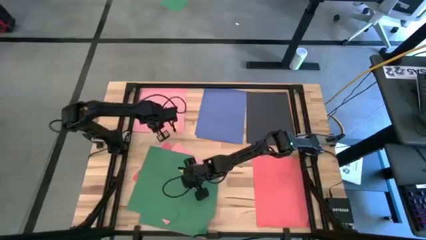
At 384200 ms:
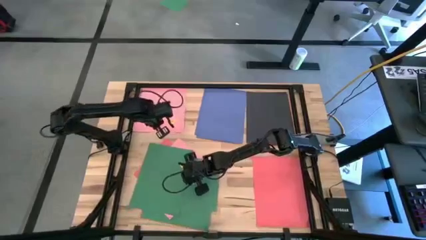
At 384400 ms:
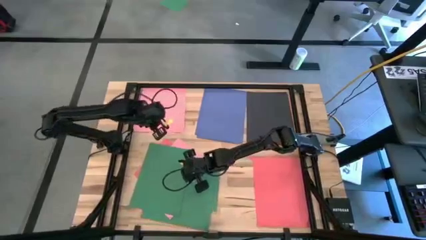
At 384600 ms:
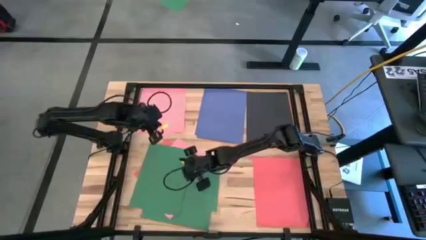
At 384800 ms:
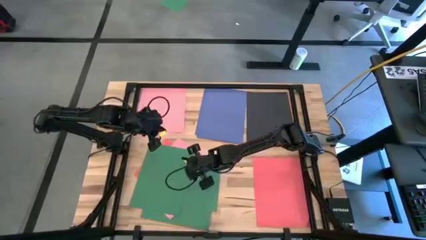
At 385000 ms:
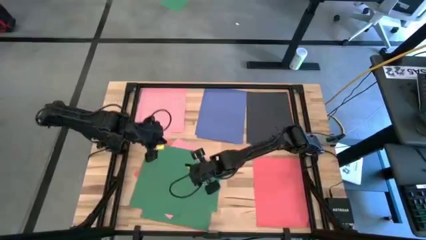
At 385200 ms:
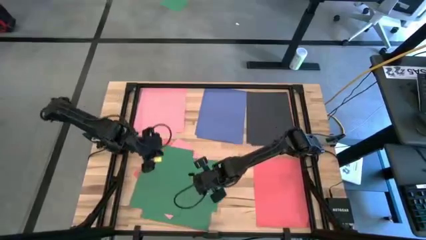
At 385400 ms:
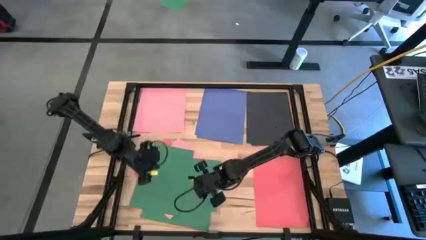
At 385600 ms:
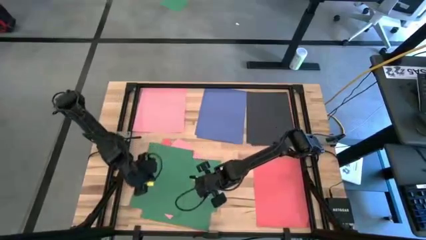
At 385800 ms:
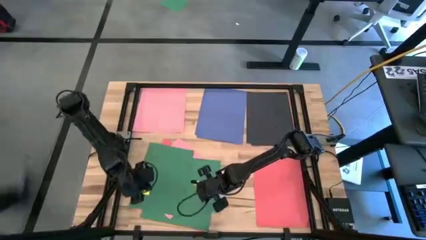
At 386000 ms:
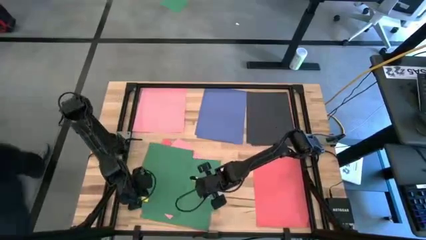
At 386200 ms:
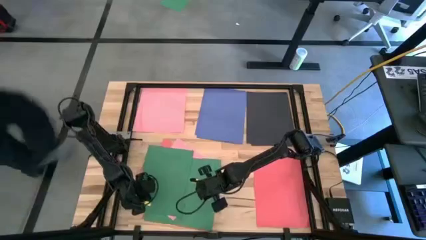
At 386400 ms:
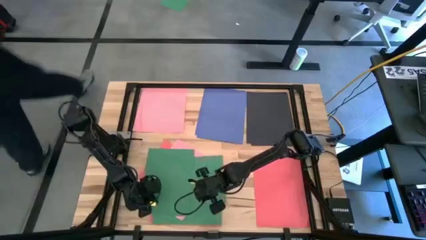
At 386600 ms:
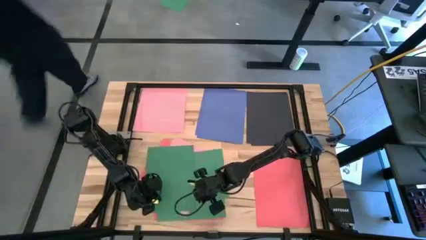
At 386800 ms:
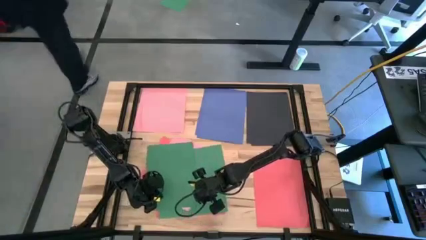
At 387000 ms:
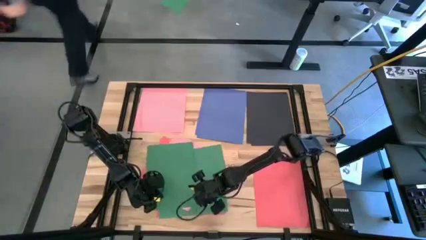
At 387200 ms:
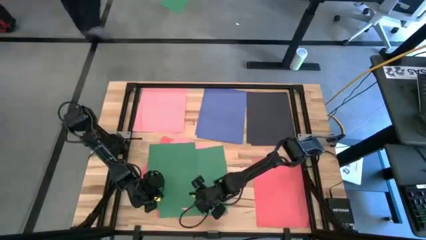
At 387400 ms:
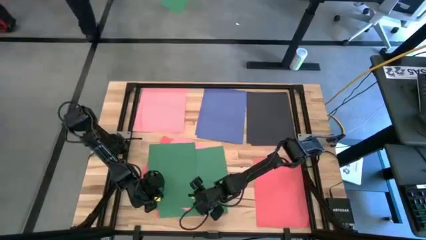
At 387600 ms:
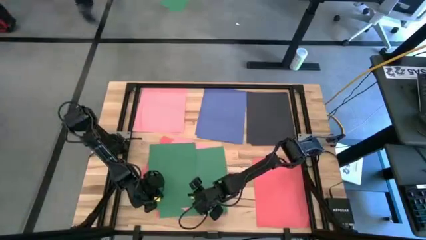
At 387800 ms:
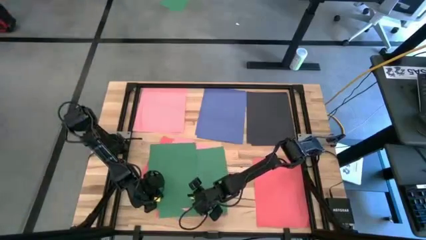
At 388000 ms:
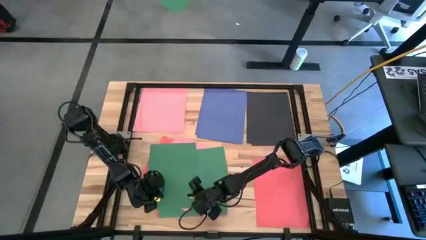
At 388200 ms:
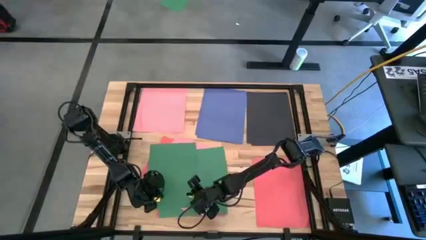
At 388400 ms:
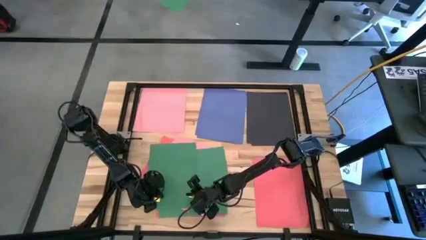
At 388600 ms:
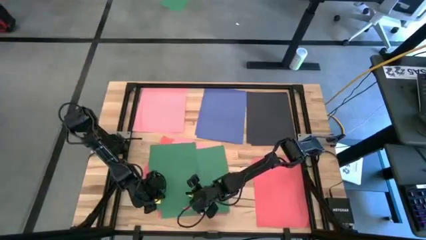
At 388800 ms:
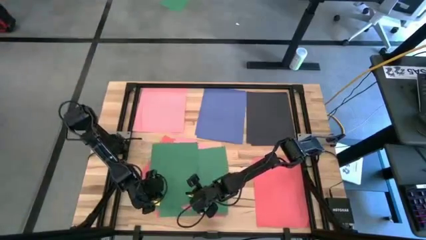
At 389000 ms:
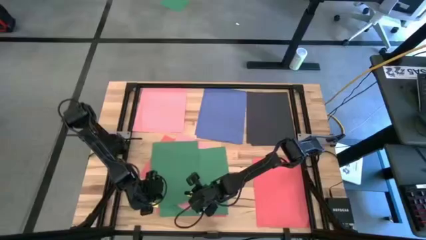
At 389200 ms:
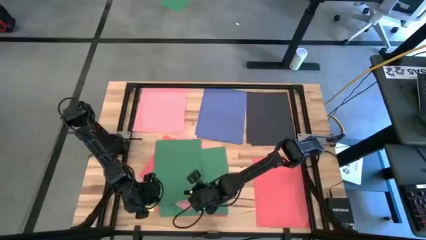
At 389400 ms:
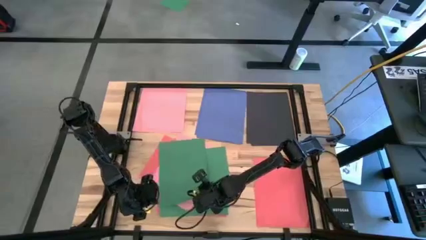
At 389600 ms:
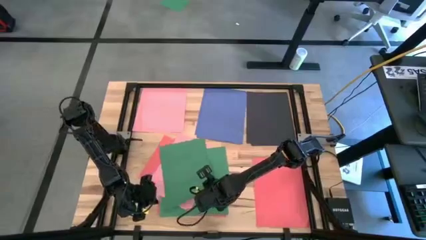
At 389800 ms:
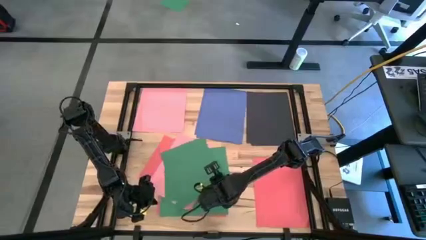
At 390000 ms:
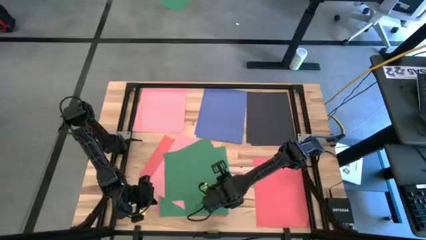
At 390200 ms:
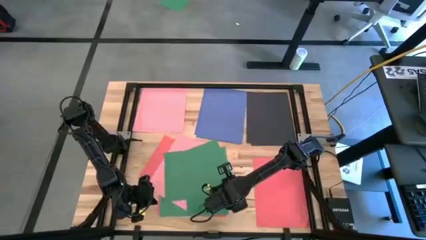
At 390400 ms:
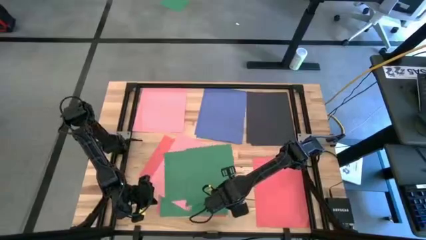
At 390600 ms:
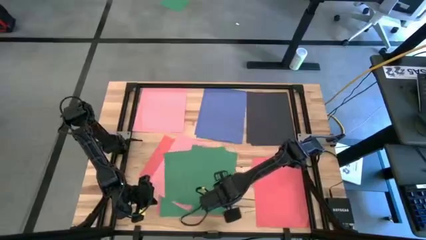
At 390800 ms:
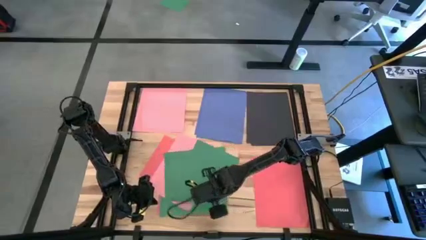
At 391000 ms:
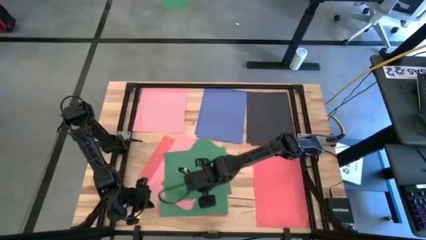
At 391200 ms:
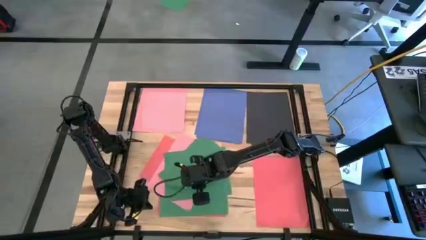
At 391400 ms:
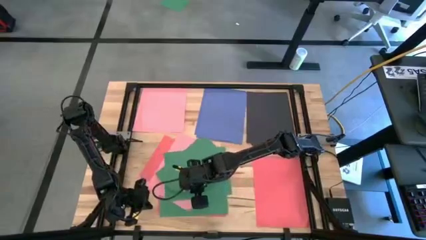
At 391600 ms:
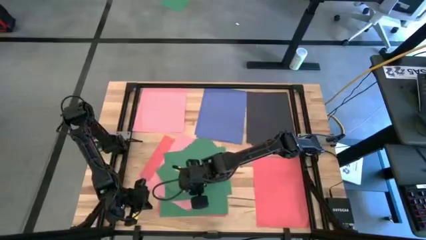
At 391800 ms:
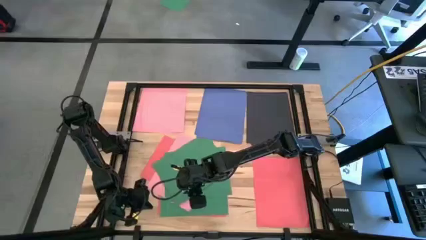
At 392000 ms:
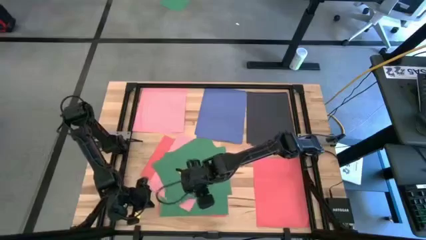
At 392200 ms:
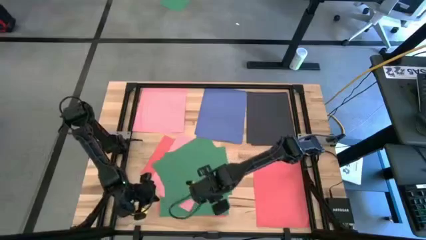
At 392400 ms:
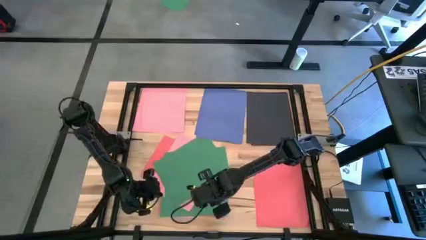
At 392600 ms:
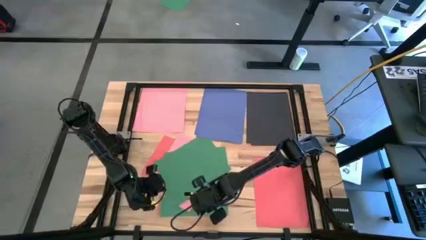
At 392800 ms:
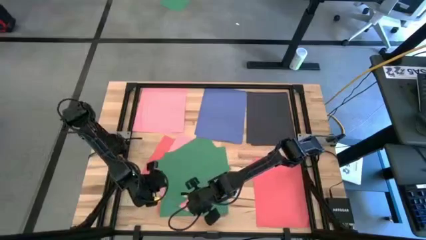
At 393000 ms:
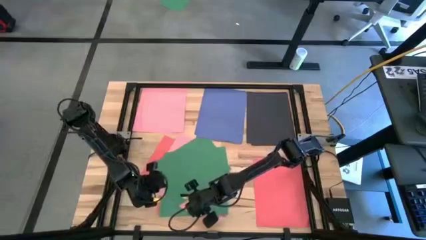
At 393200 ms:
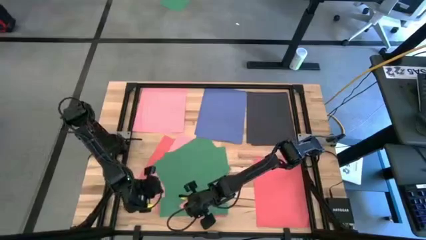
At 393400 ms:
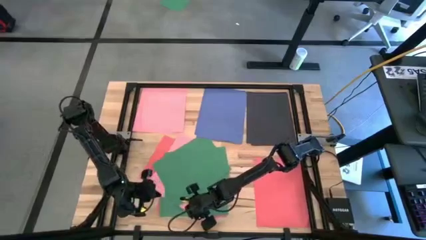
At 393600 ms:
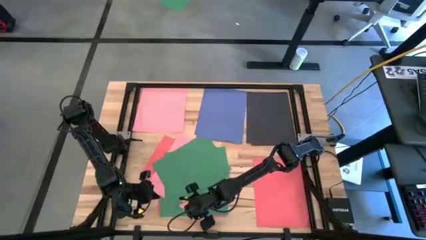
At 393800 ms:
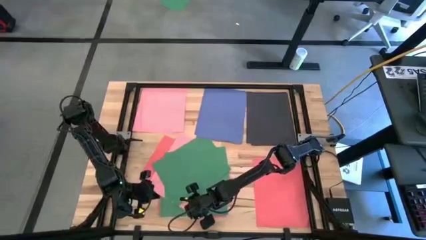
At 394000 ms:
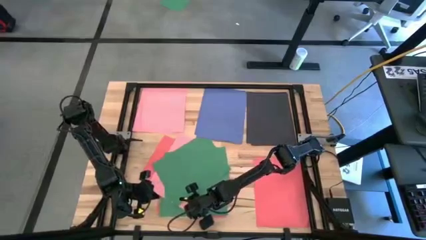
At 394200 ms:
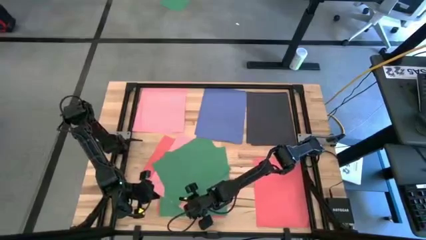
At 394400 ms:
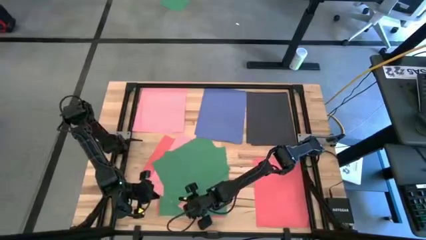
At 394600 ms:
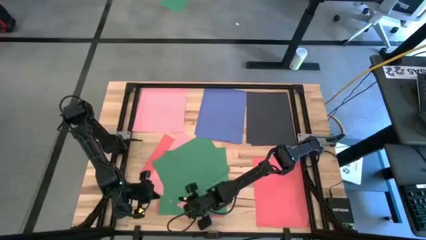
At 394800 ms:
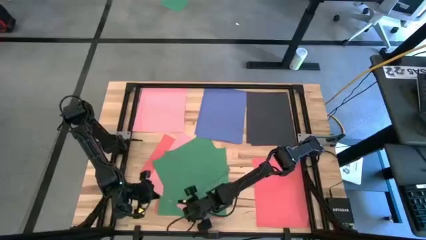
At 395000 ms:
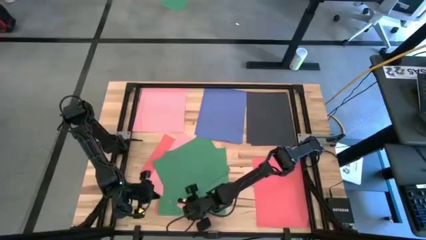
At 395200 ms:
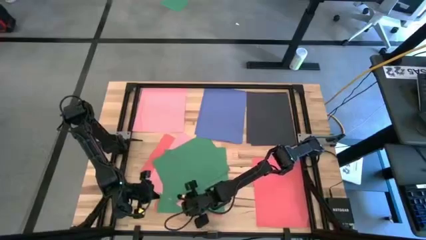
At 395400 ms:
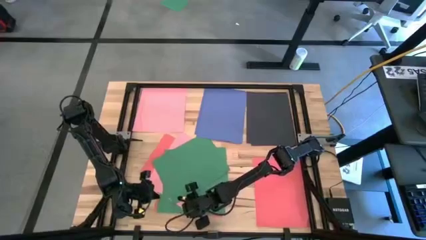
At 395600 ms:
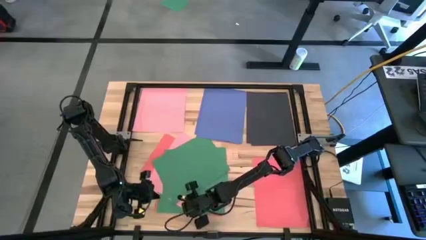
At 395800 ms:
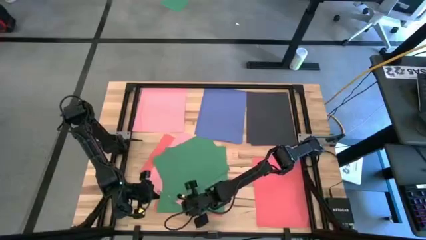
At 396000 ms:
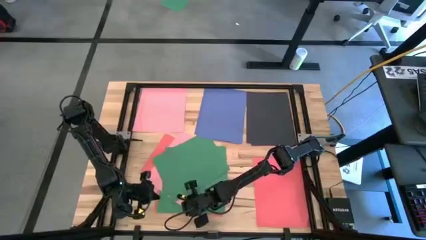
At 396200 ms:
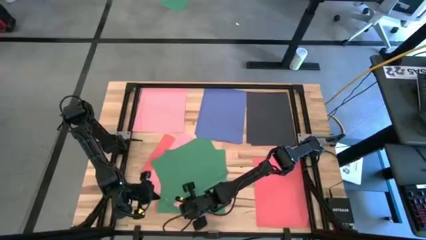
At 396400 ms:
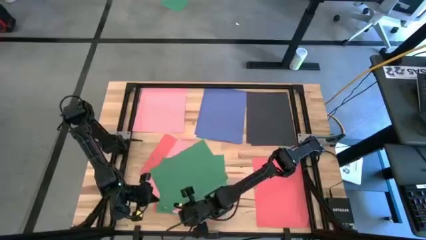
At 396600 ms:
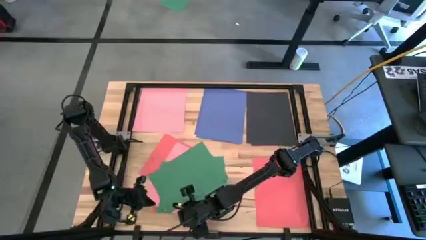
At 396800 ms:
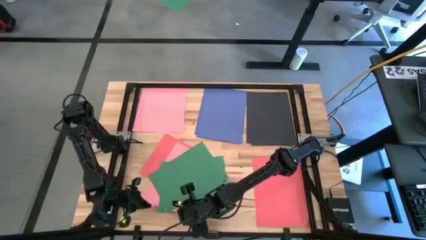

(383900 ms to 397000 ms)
Task: Organize paper
Stack the pink paper on top of the other pink papers on the table

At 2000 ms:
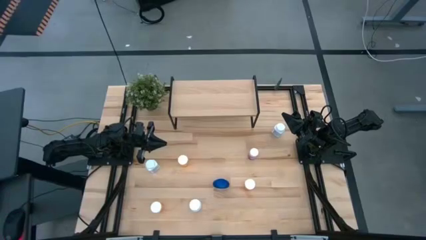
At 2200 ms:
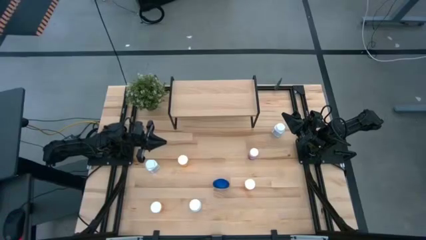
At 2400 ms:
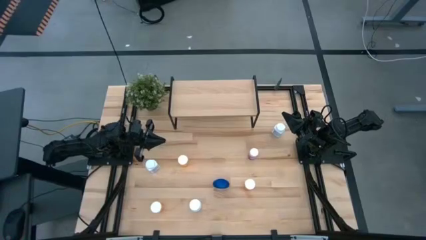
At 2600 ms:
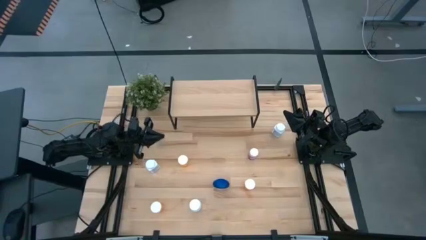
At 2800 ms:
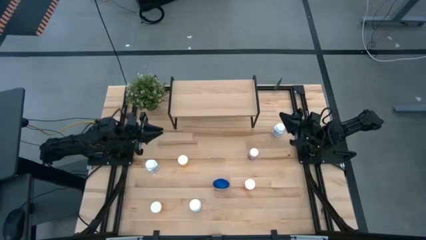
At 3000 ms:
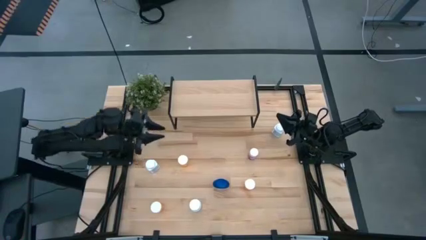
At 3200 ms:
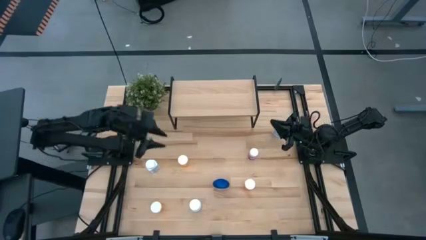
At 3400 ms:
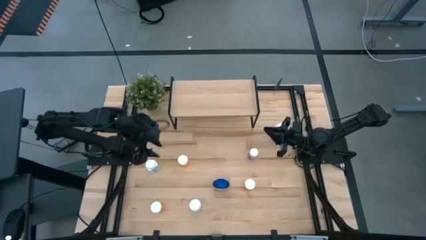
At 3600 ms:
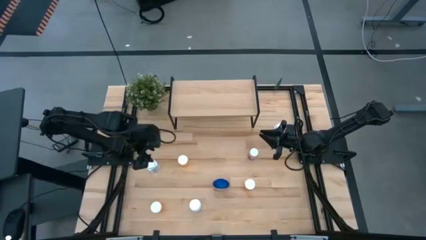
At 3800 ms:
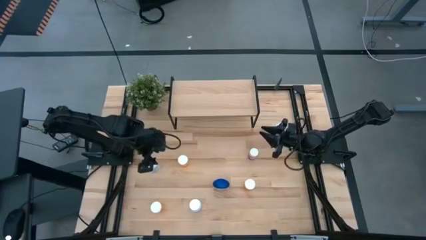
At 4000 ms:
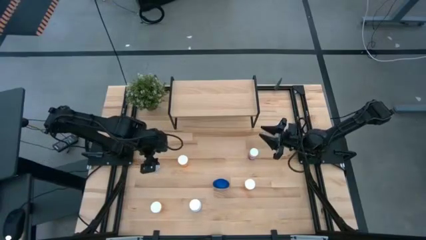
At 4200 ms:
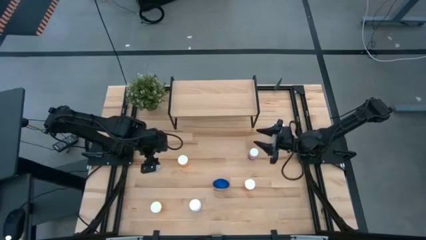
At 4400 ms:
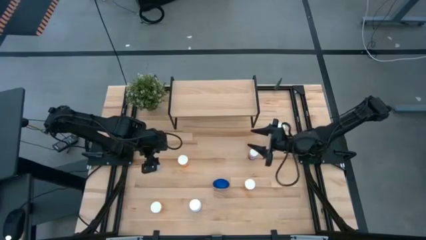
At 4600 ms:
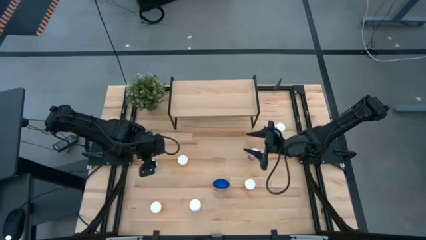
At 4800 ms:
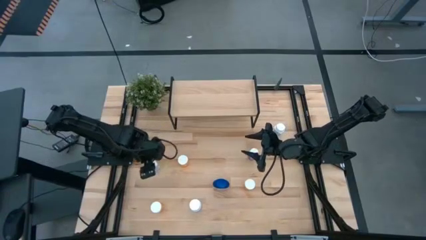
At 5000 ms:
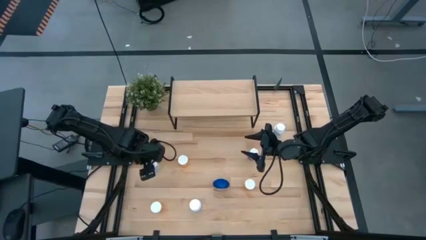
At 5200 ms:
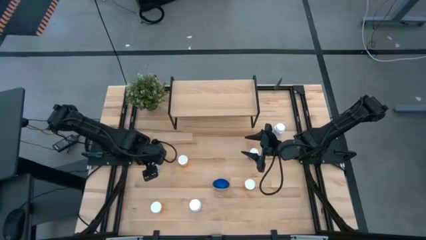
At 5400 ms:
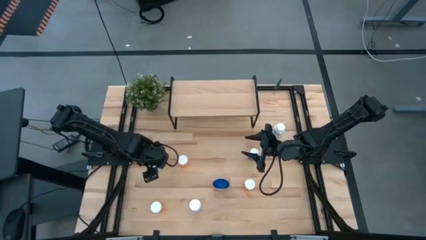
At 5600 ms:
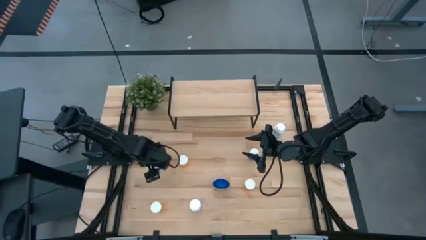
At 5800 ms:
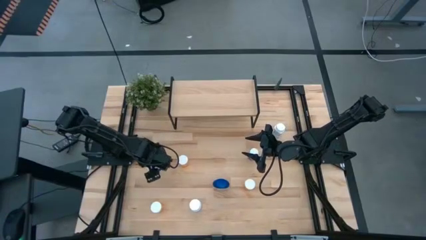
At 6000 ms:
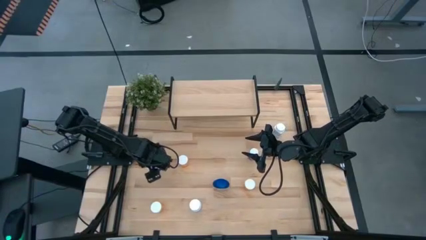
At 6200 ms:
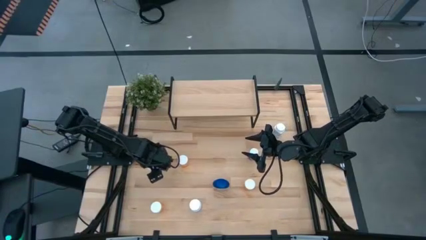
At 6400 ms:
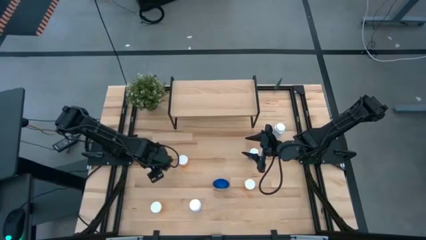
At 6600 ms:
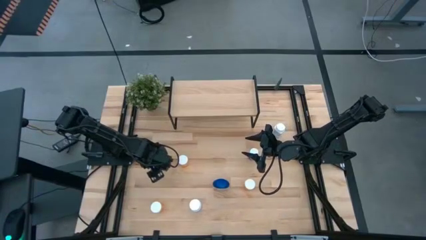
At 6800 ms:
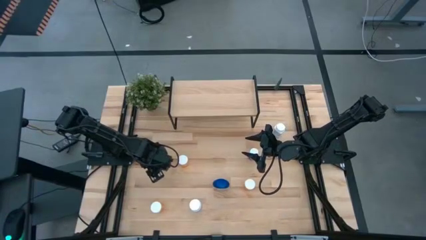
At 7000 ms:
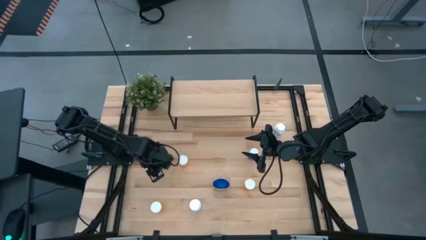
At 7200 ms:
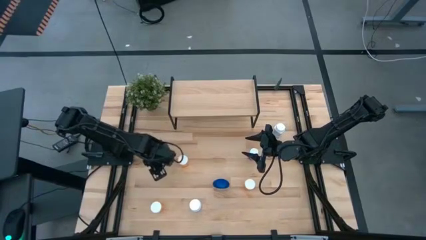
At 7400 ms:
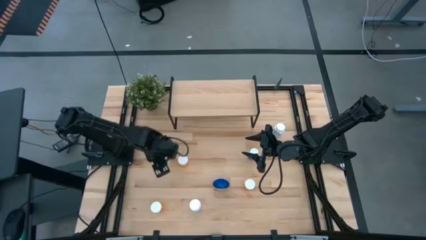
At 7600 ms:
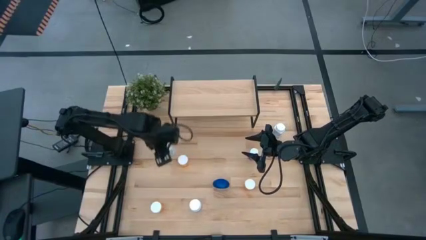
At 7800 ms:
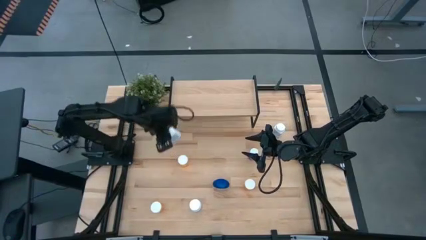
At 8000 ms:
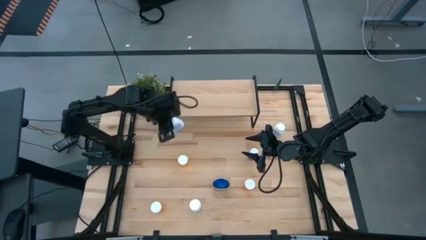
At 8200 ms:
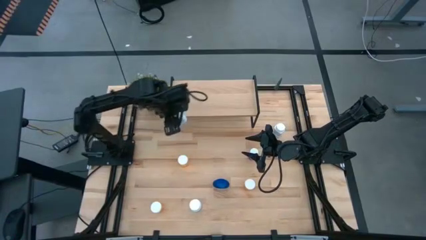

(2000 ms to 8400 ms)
Task: Pick and place medicine bottles onto shelf by color
Put the white blue pill bottle on the shelf
